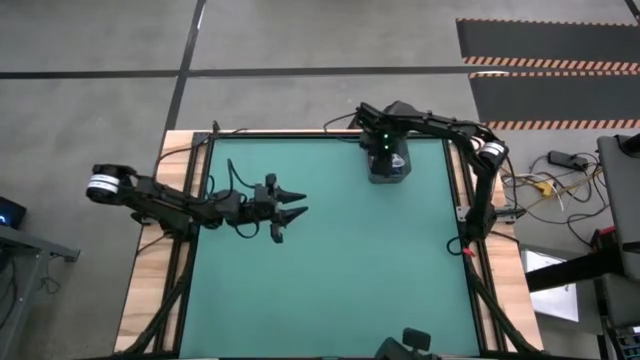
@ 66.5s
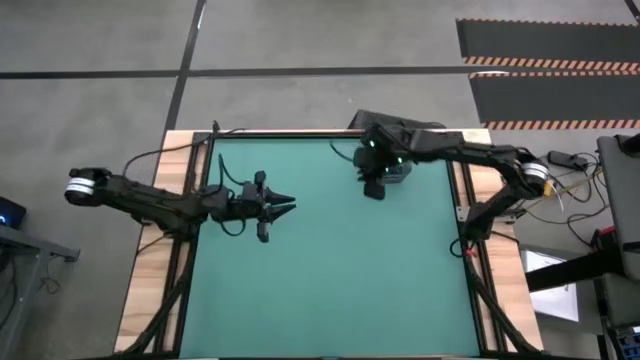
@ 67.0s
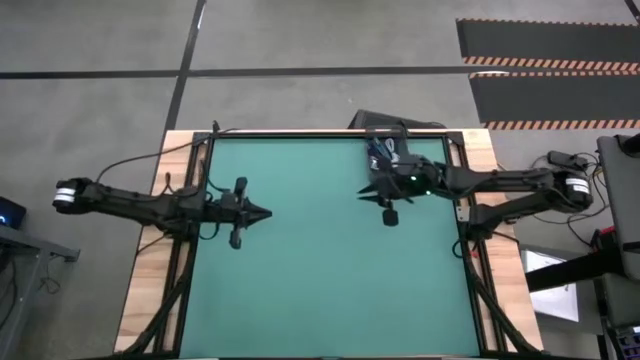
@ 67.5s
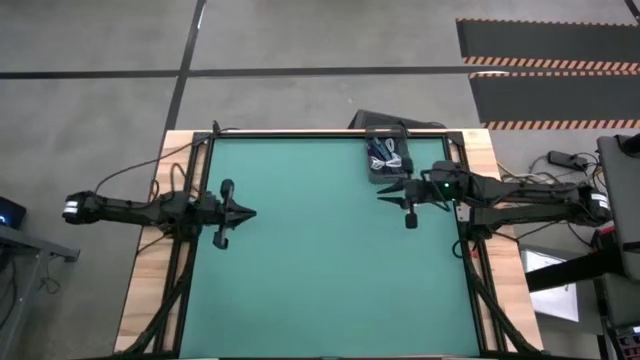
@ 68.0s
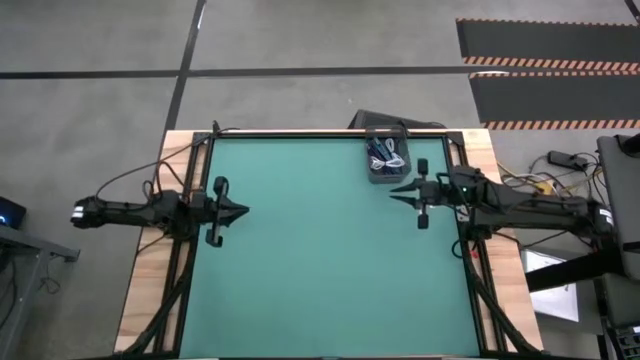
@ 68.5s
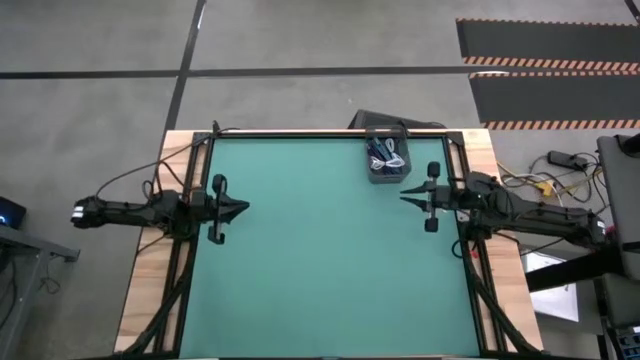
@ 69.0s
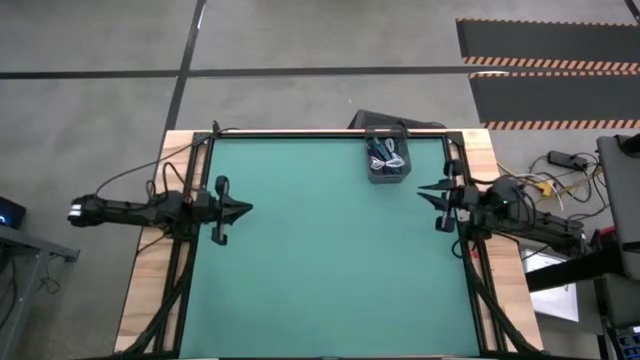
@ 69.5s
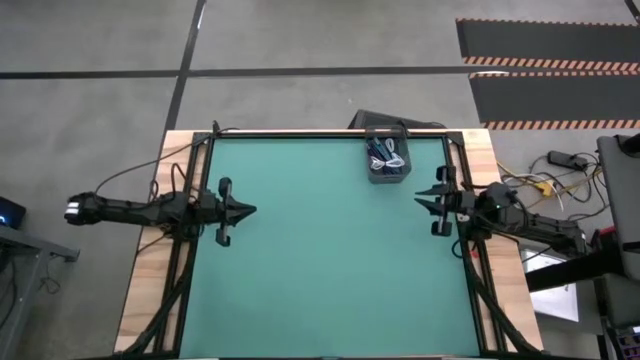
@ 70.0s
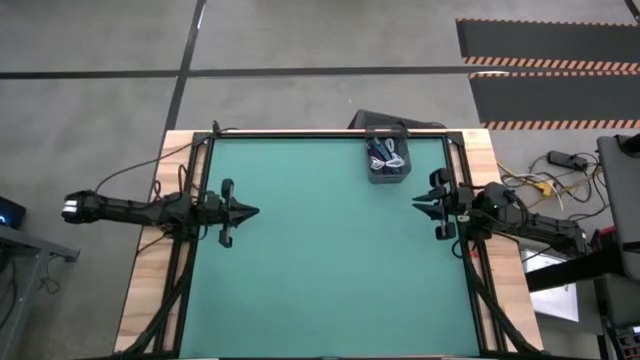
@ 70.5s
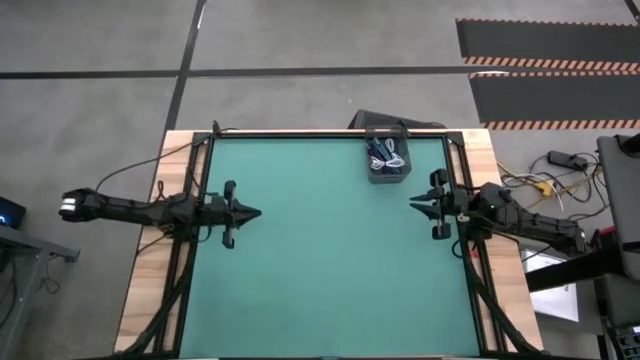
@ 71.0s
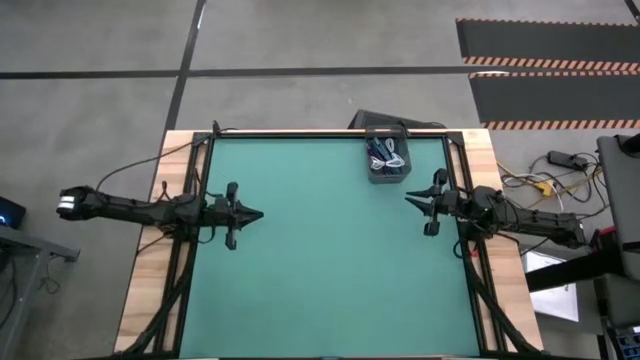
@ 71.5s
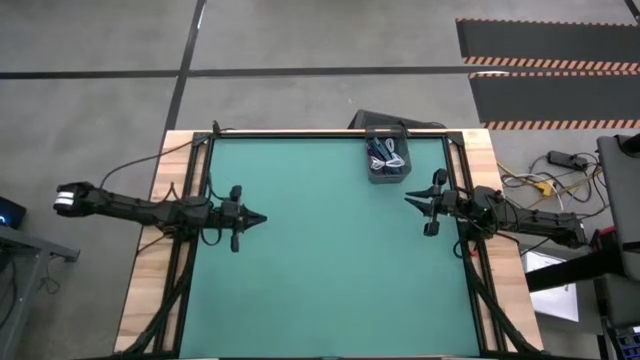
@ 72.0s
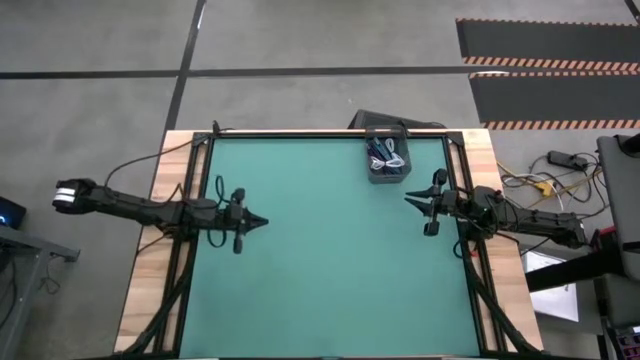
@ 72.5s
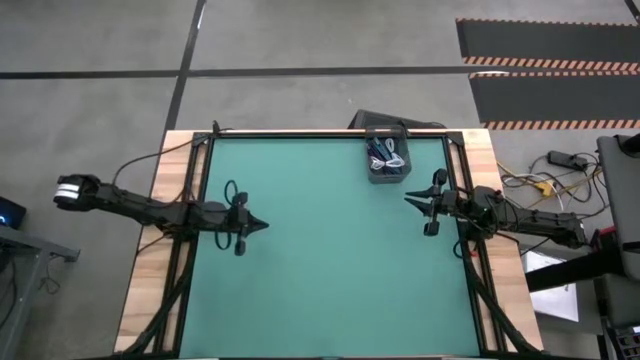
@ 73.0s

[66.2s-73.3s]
Task: Pick and place USB-C Cables
Return to Home Position

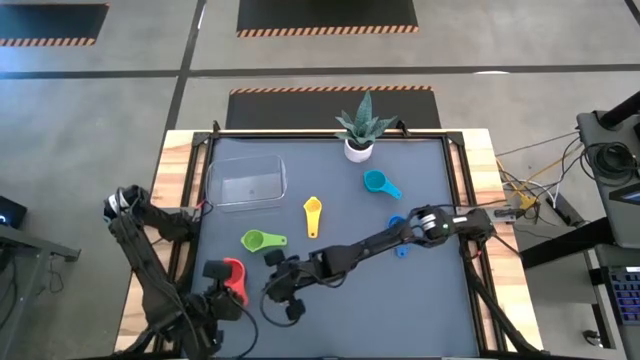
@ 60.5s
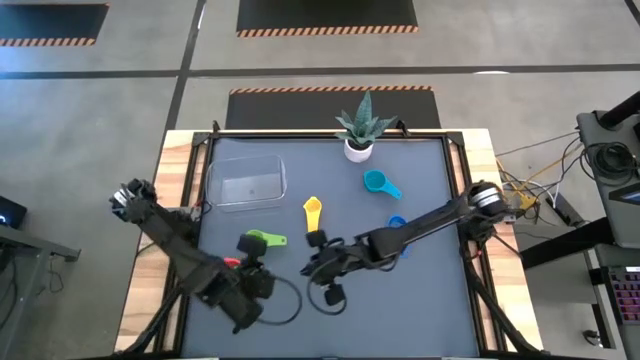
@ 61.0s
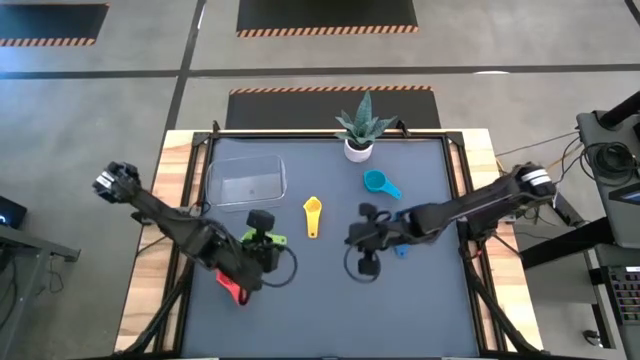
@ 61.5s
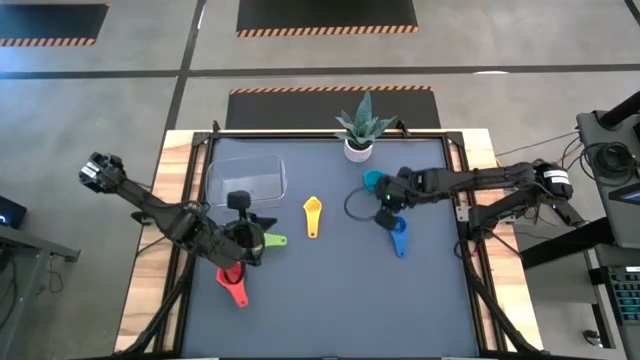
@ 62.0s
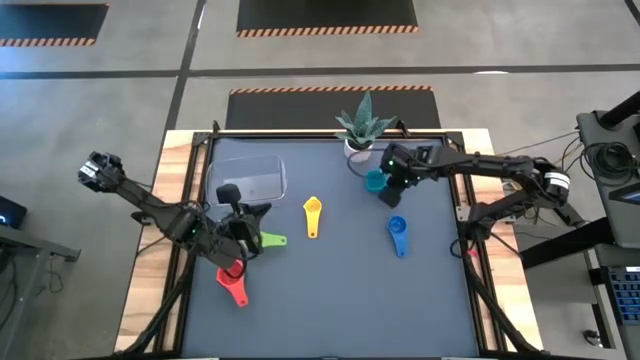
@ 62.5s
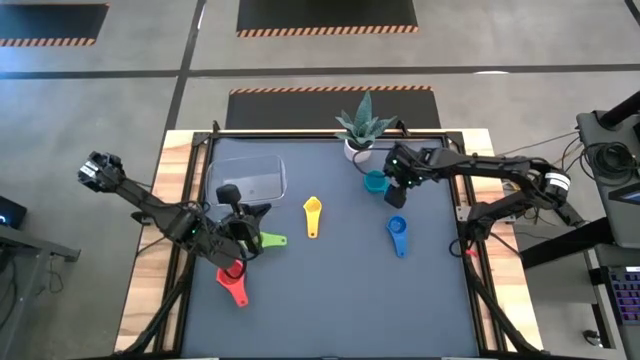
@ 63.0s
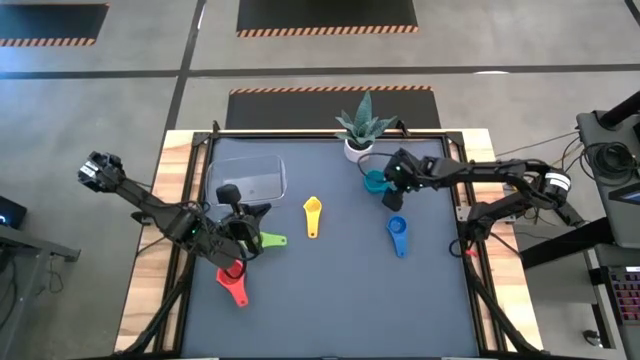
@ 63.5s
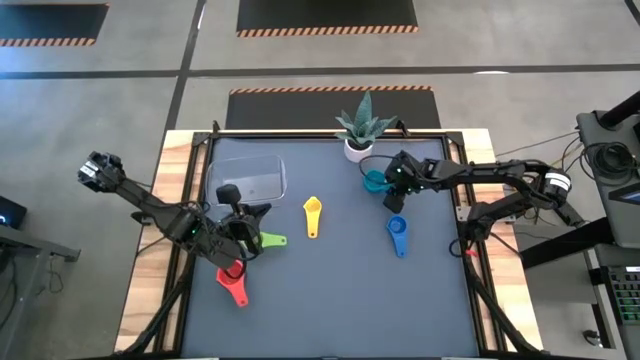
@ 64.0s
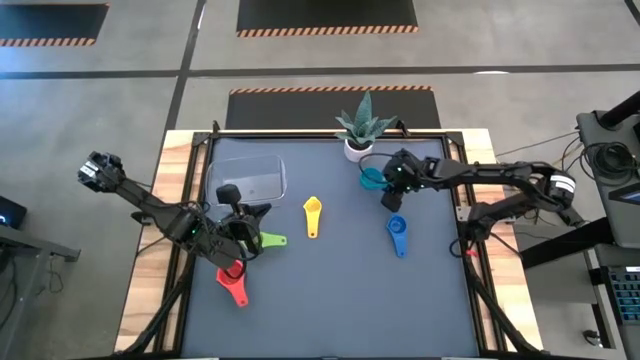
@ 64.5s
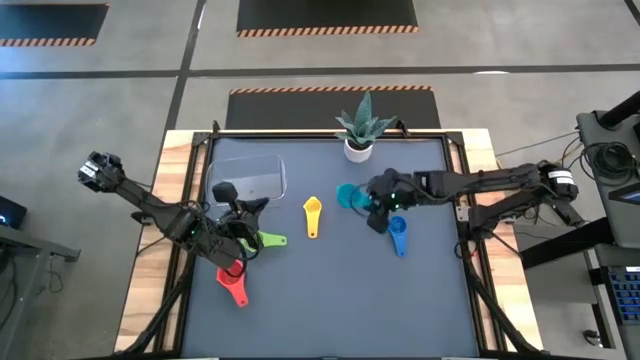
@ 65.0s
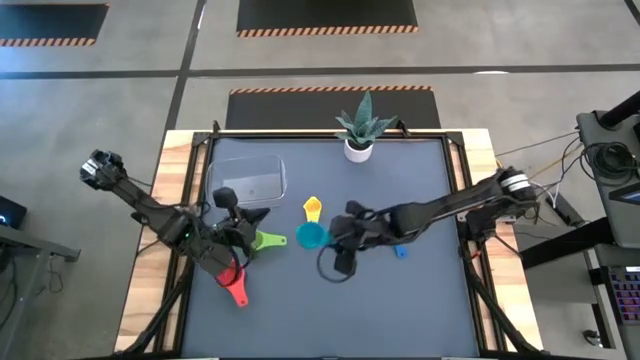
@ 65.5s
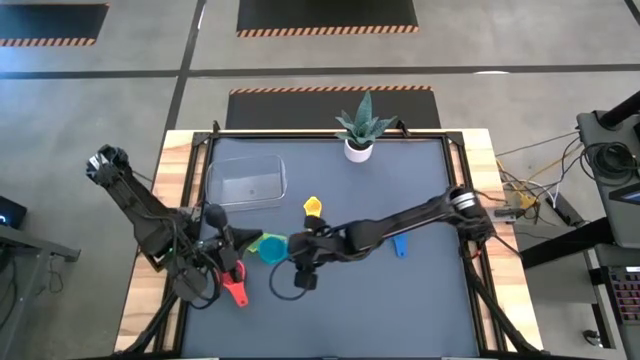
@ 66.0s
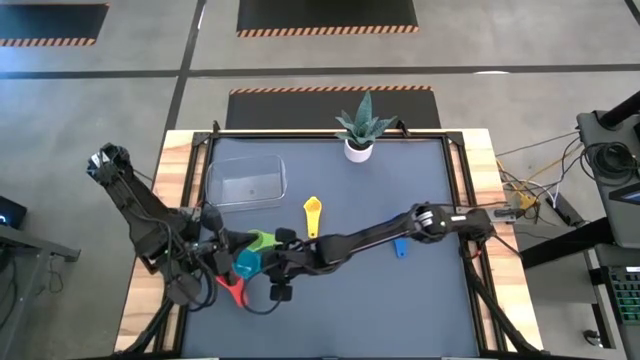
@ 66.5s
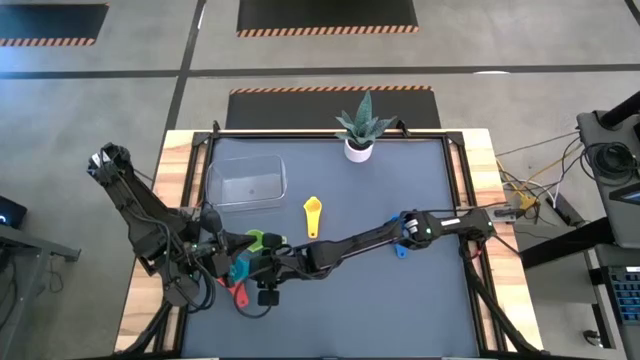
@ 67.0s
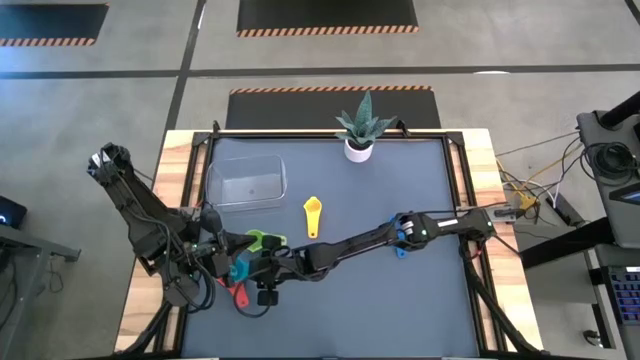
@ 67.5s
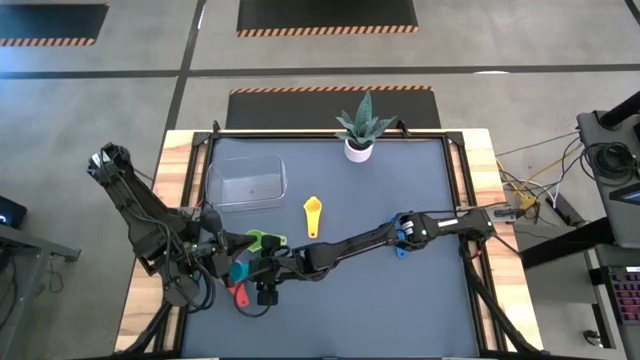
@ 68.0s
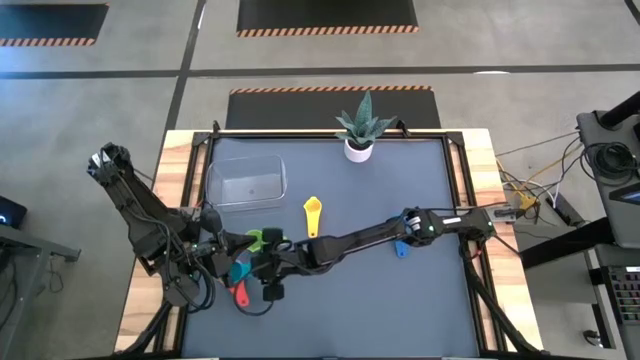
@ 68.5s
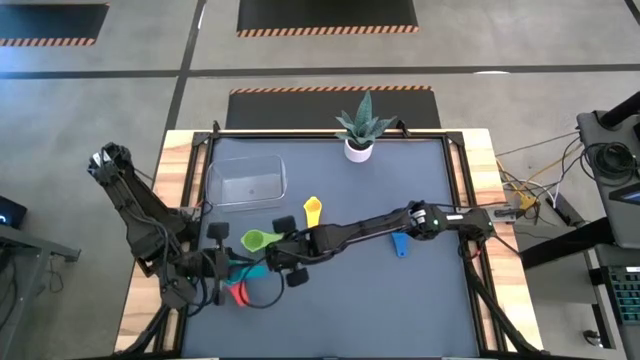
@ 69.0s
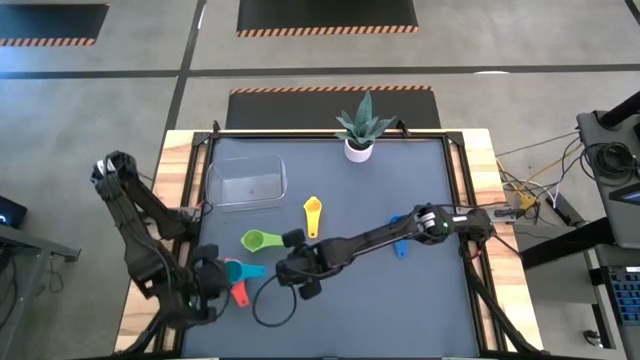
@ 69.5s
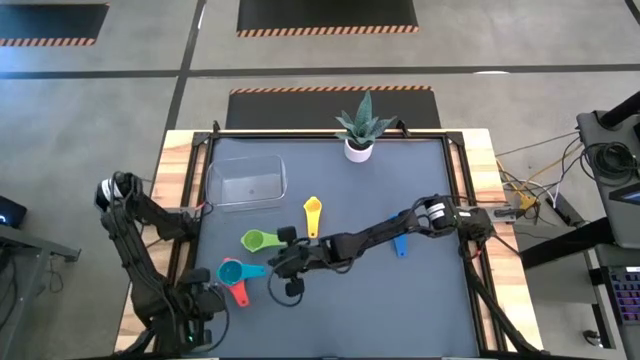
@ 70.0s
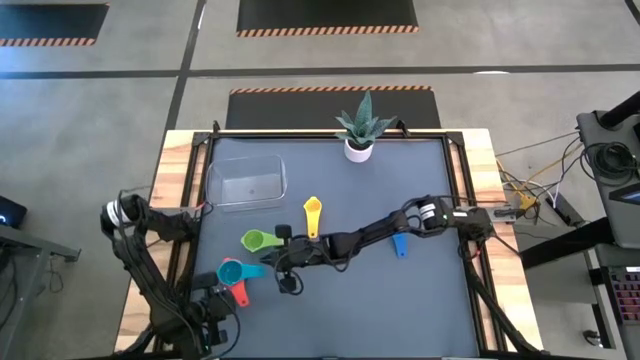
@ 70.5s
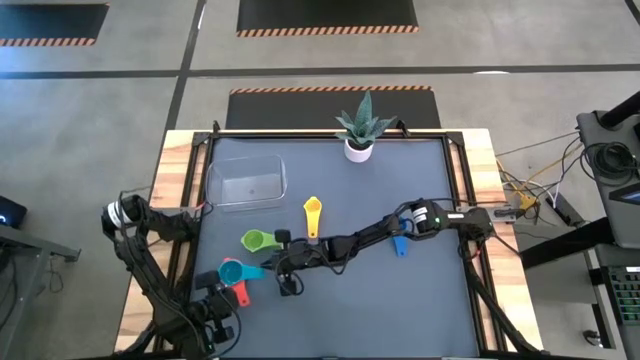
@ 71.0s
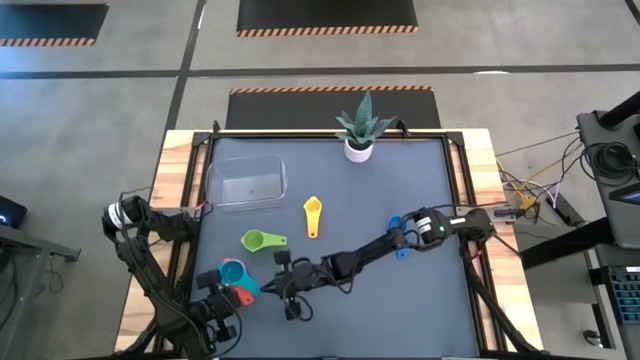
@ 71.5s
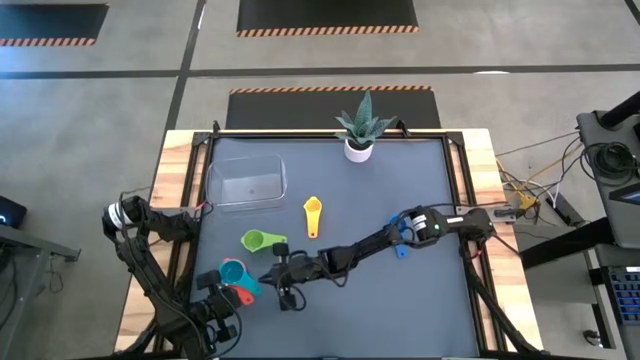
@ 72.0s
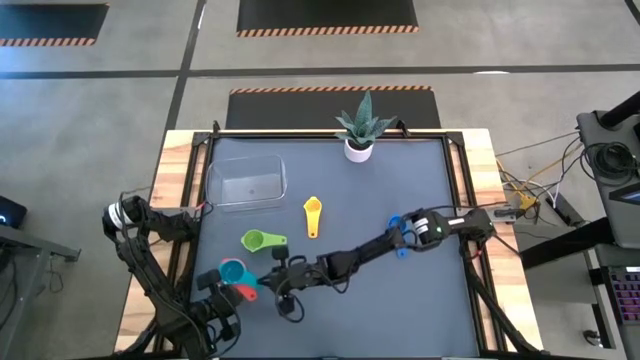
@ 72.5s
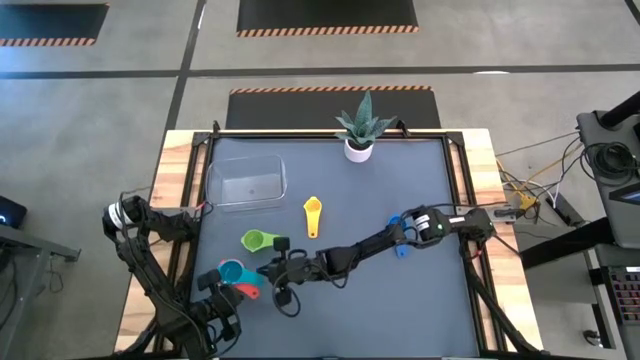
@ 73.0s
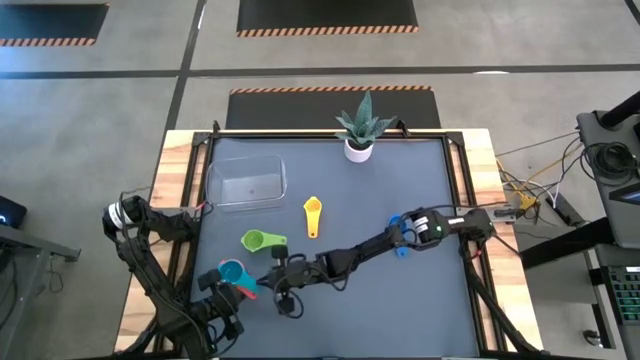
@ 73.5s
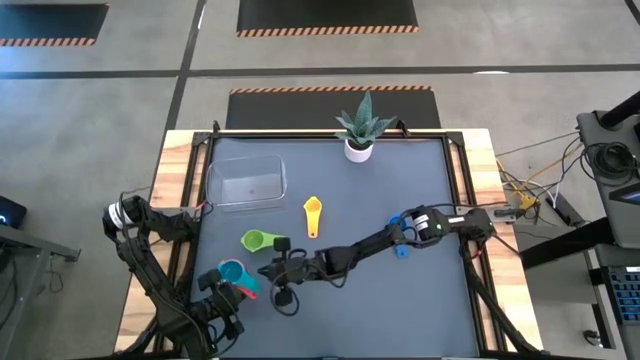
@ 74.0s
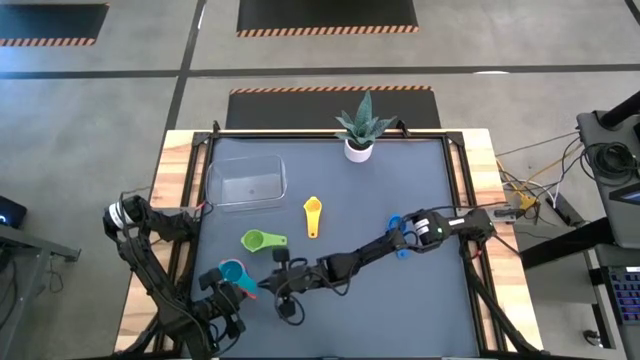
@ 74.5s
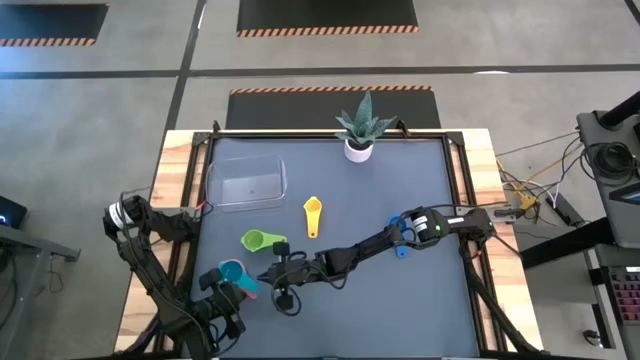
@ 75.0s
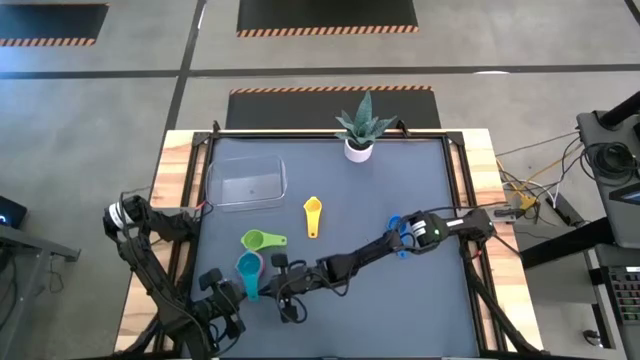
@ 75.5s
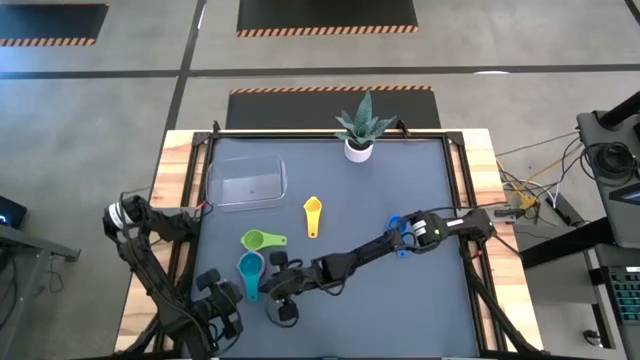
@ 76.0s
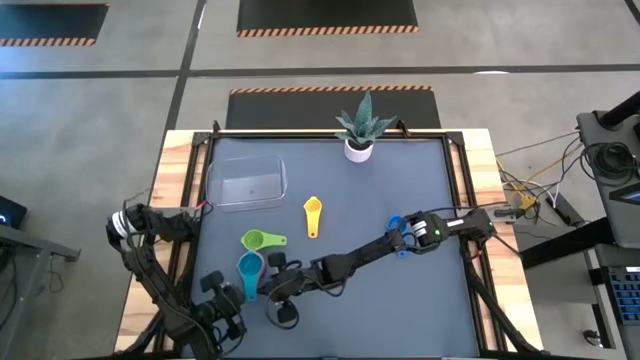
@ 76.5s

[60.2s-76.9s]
Task: Nest measuring cups in basket
Stack the light blue measuring cup on top of the red measuring cup
